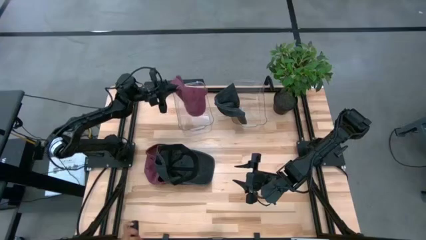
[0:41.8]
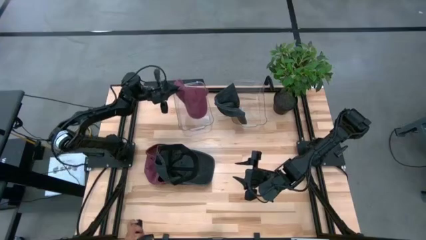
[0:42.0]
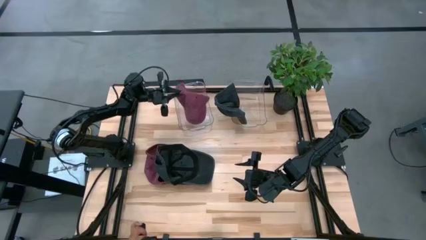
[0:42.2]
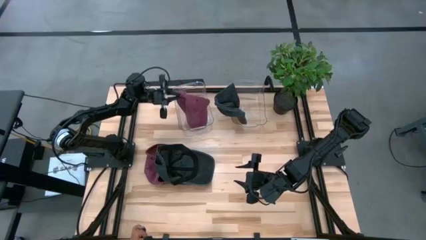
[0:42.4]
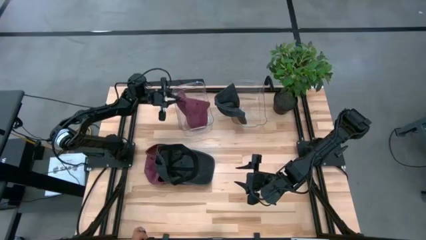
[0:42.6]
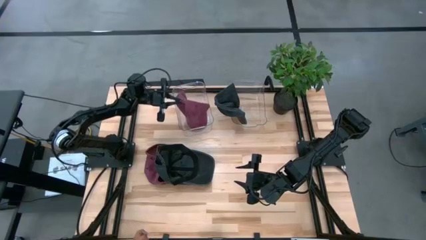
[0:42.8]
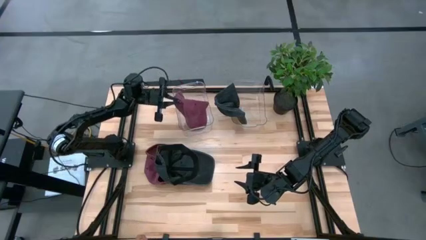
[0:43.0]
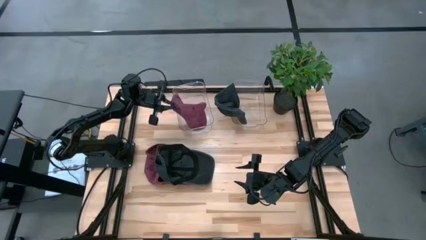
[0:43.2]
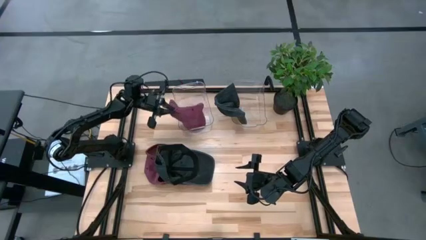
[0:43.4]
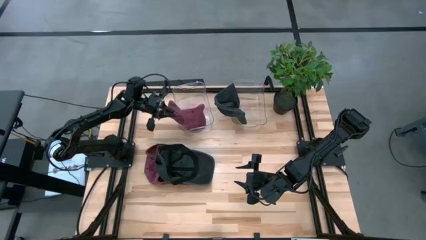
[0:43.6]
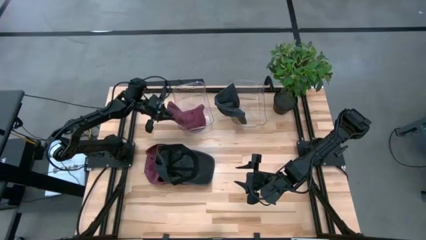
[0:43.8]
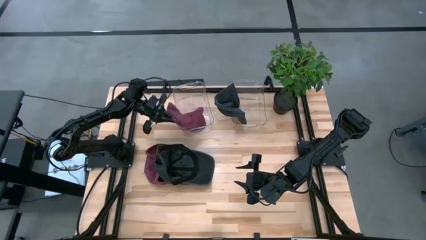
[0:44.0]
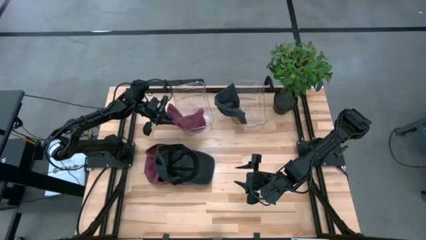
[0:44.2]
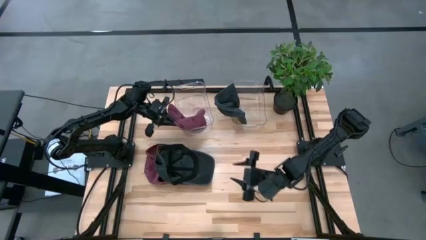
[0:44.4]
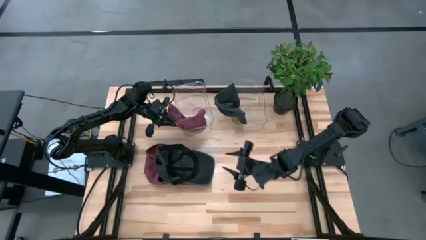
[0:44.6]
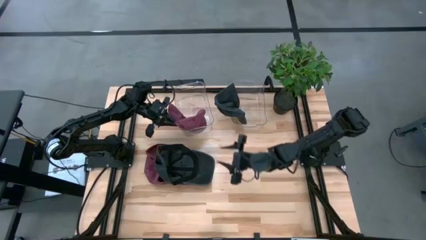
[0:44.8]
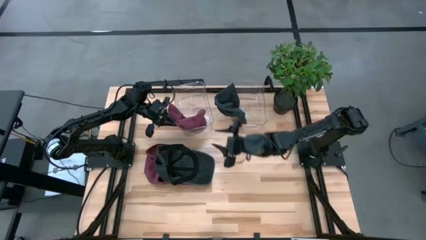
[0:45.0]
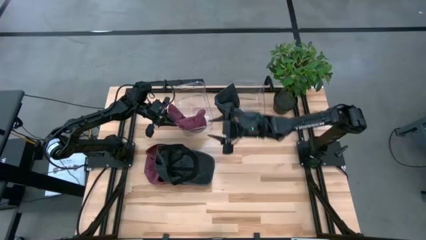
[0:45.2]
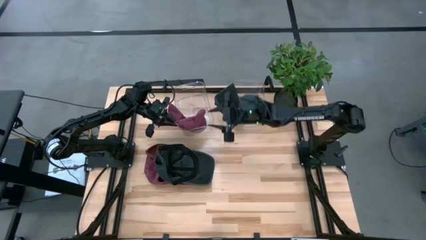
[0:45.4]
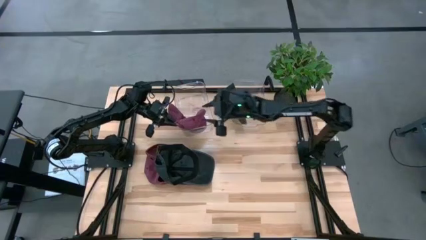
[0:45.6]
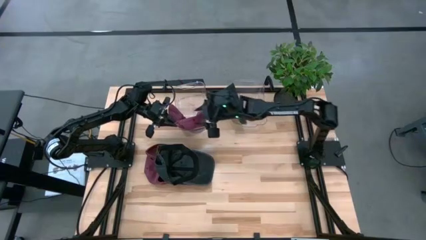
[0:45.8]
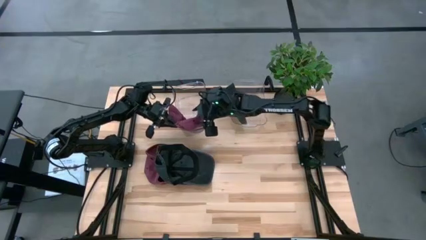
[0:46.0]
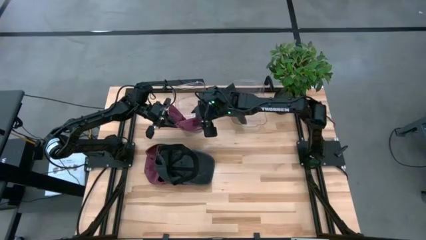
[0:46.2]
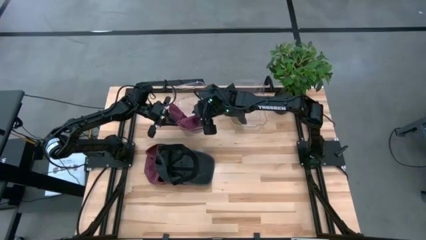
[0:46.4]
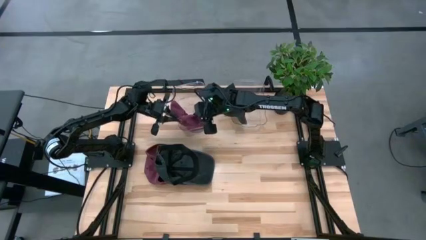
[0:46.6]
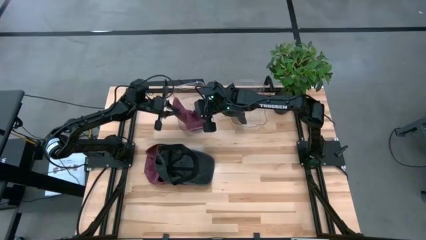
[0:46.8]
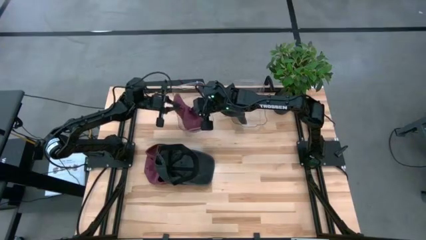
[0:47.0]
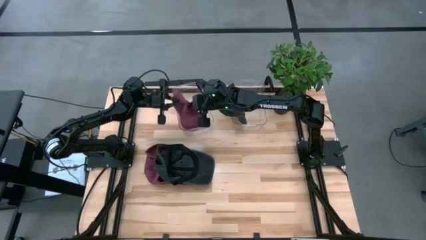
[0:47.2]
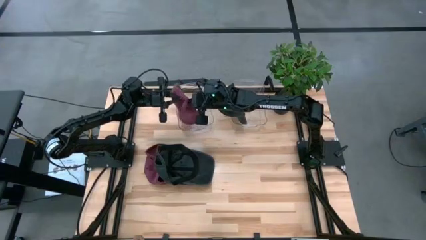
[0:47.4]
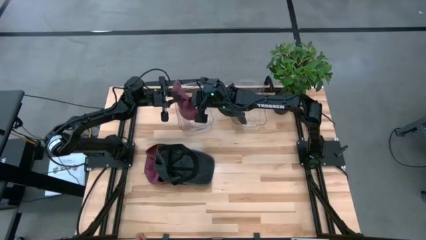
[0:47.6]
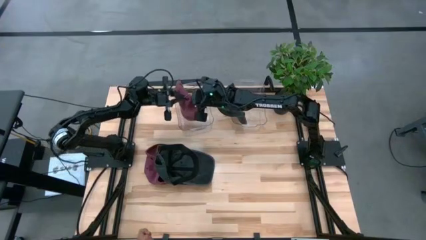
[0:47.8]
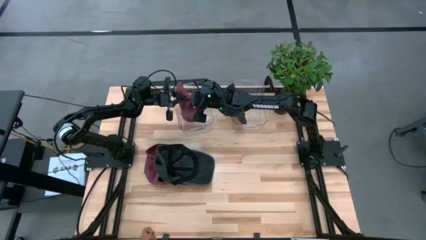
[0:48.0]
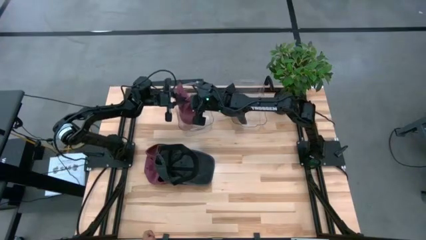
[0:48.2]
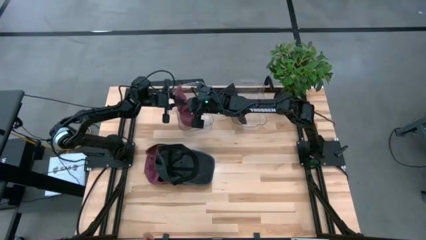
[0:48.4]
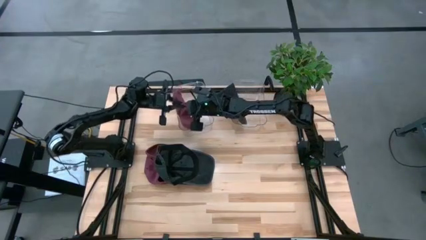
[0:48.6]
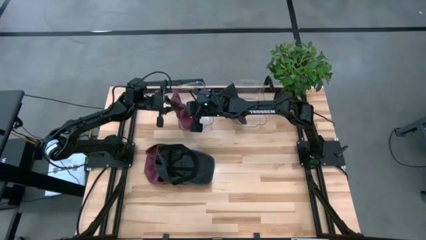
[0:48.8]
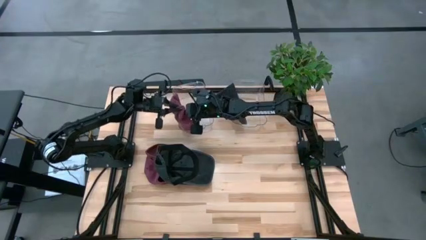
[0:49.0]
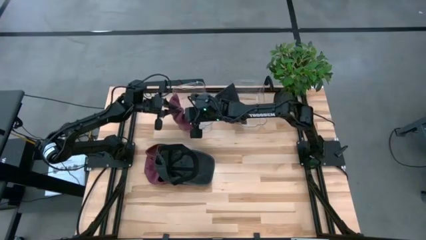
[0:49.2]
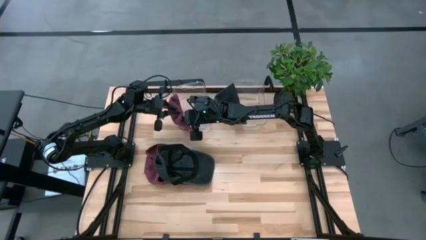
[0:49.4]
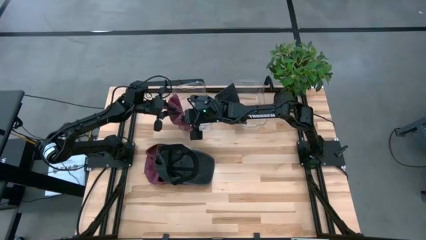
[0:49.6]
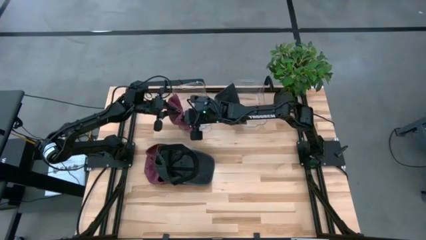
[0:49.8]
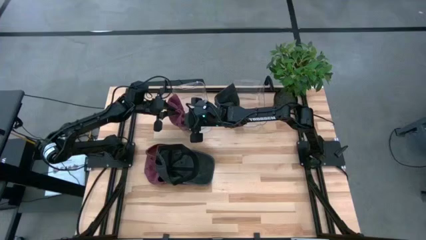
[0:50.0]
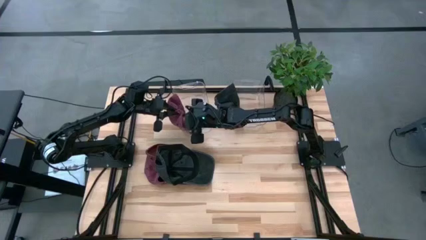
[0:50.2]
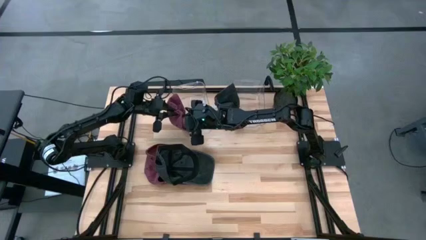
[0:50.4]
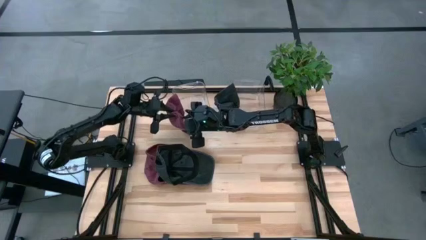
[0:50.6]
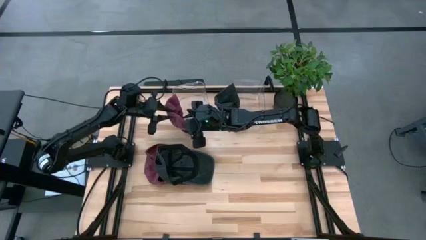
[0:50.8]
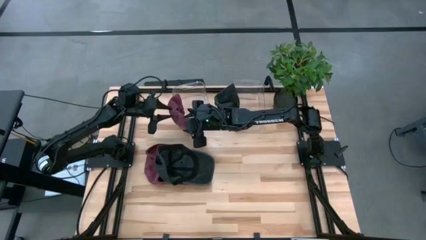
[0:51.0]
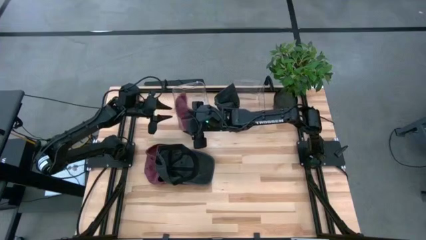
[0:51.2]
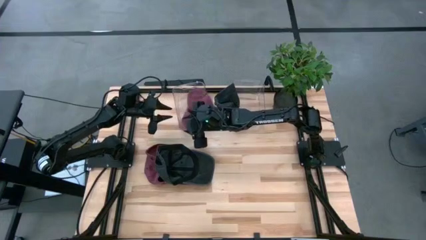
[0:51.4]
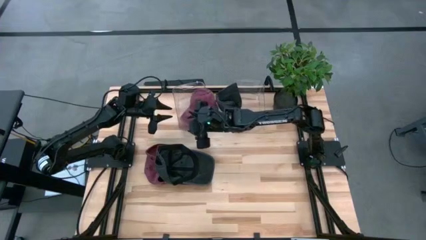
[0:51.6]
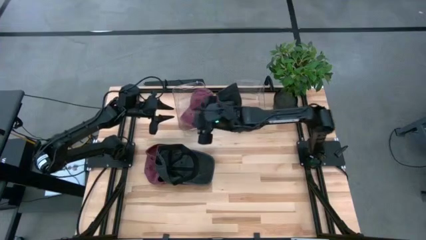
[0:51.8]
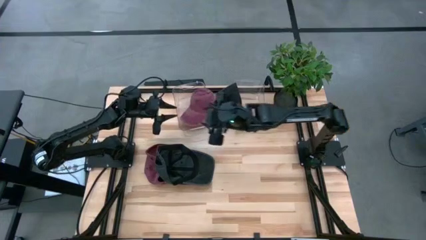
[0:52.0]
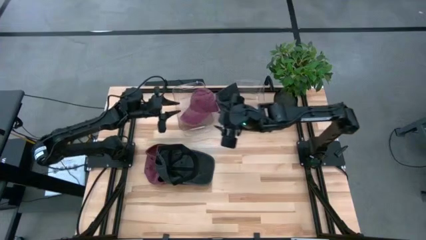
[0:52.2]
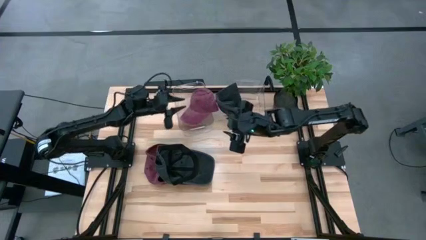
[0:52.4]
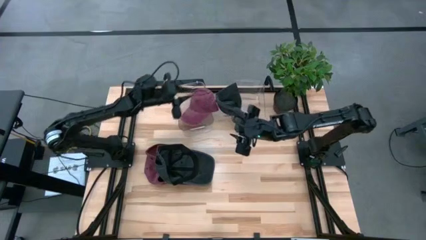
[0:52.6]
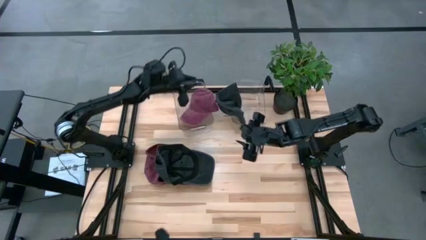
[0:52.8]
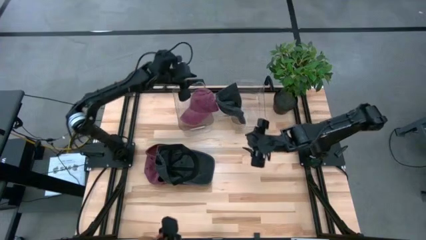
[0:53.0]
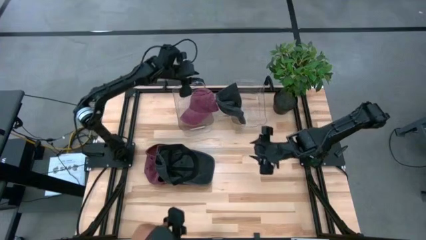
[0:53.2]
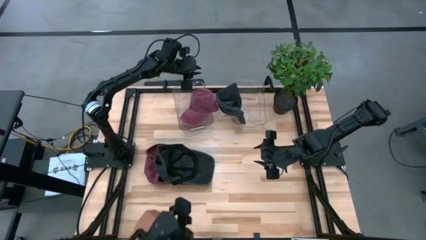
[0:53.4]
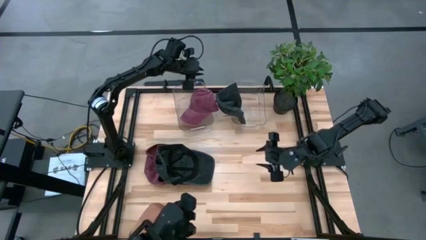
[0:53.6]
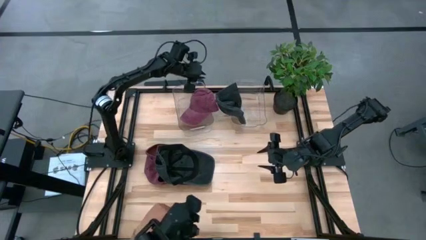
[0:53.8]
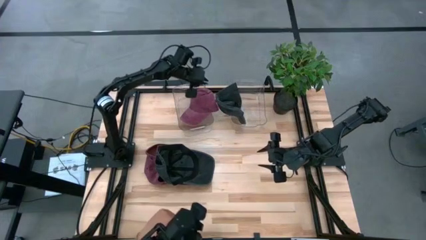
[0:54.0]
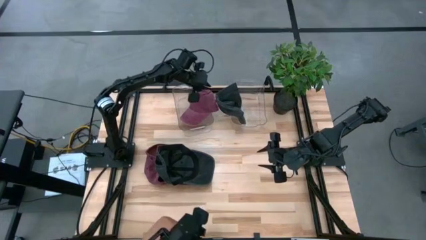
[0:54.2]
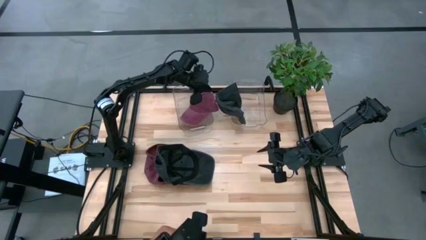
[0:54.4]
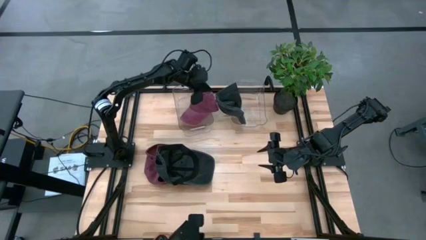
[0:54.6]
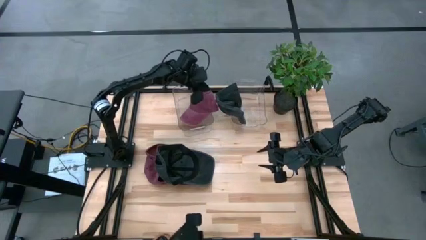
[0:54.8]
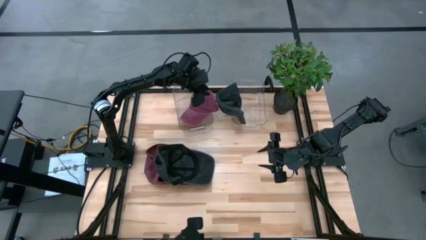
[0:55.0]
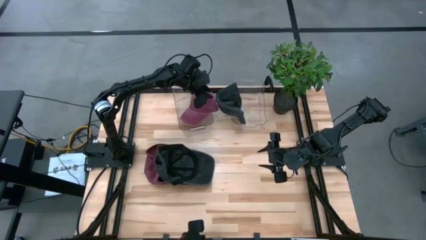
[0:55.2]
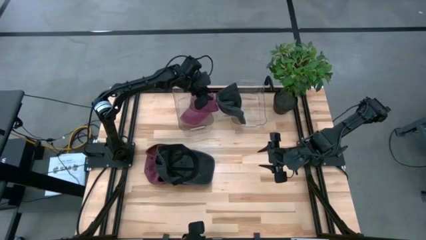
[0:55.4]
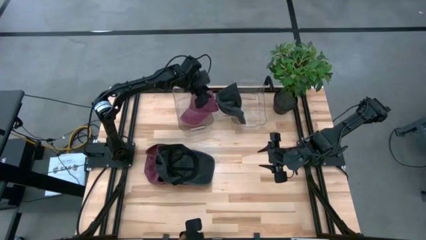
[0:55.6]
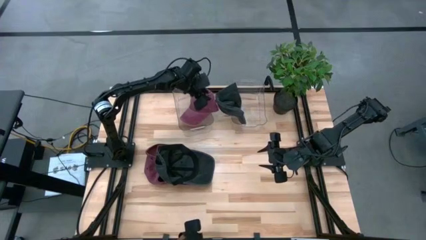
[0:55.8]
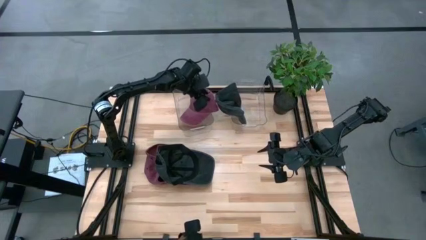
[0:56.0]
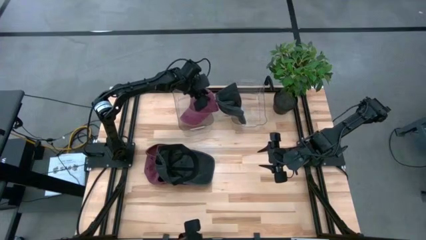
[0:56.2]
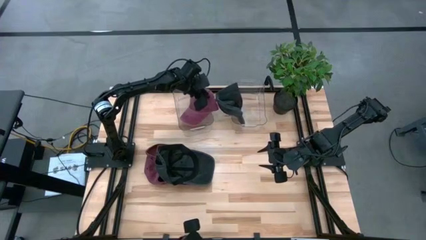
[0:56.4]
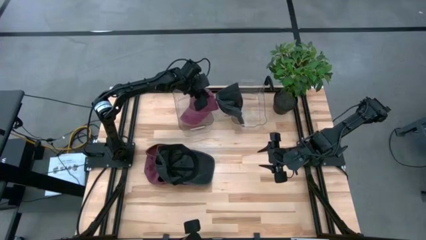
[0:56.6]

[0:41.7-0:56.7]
Task: Pick & Place hat
Put the right red cap in the left transparent bin
